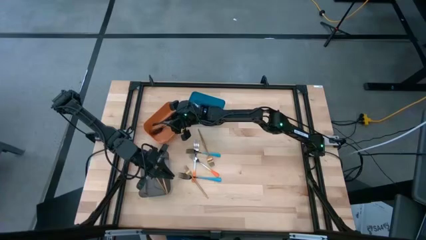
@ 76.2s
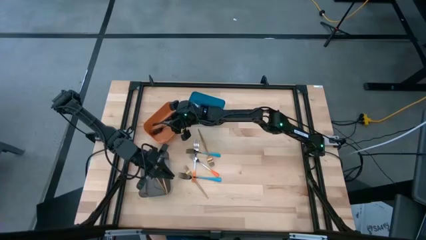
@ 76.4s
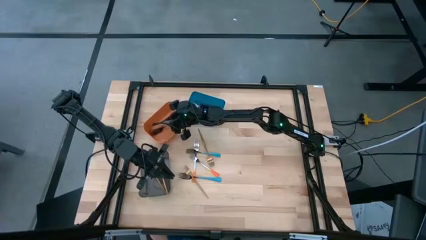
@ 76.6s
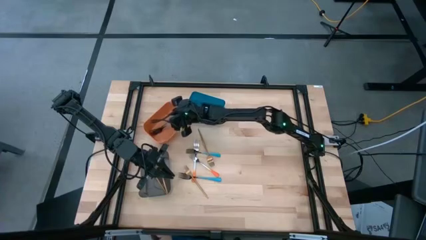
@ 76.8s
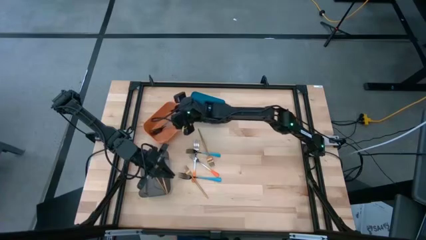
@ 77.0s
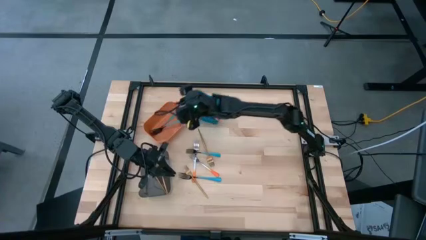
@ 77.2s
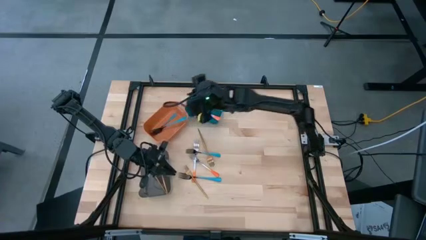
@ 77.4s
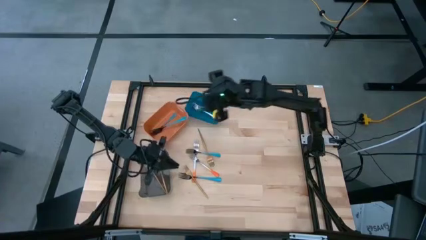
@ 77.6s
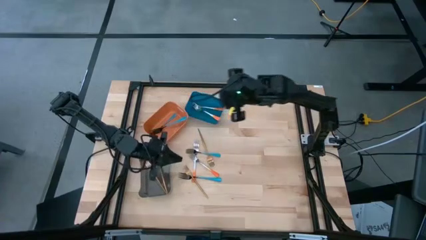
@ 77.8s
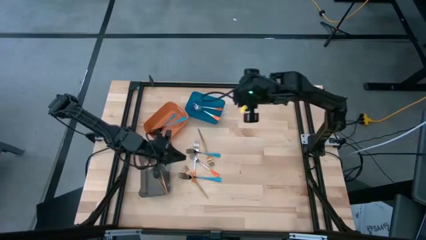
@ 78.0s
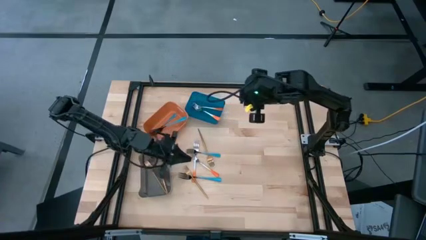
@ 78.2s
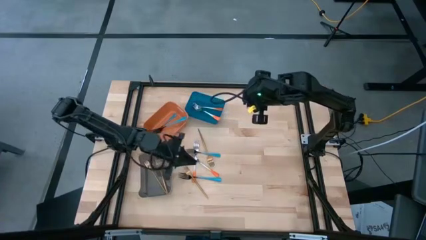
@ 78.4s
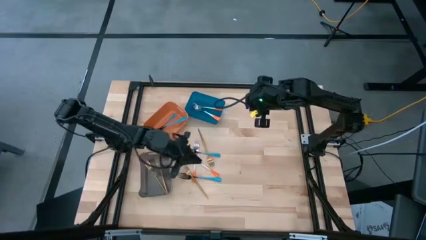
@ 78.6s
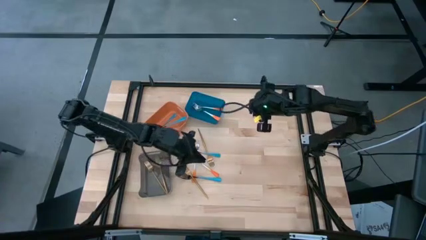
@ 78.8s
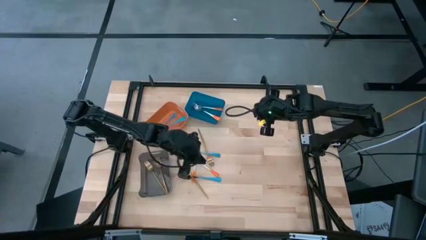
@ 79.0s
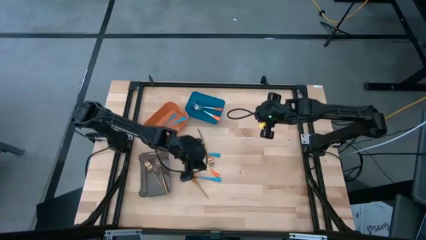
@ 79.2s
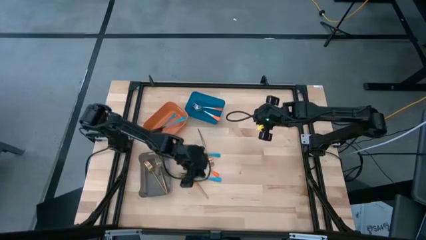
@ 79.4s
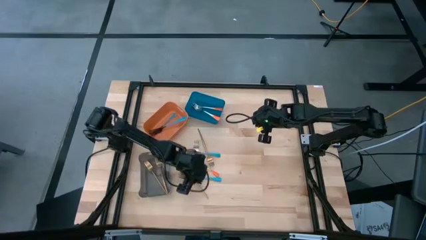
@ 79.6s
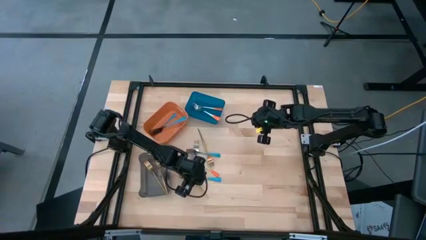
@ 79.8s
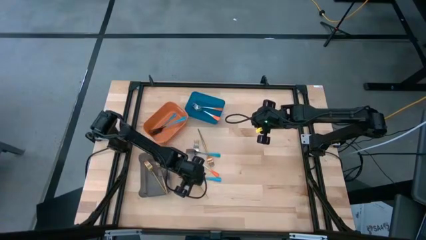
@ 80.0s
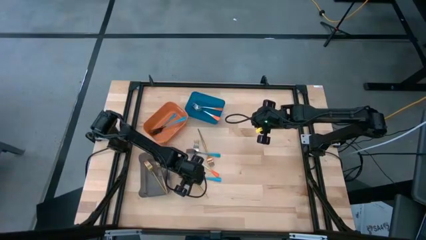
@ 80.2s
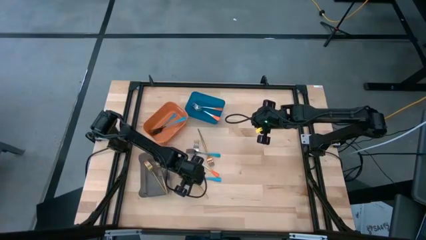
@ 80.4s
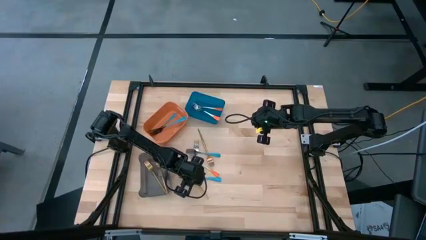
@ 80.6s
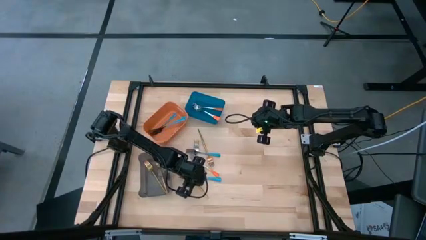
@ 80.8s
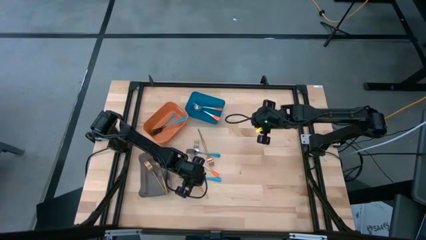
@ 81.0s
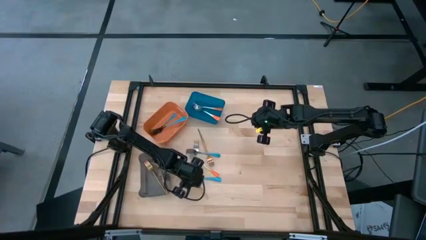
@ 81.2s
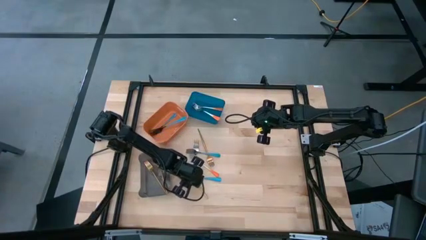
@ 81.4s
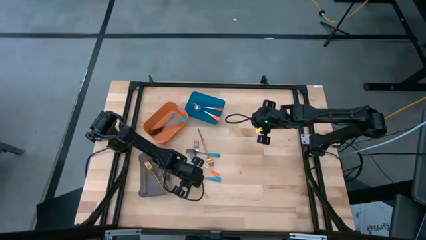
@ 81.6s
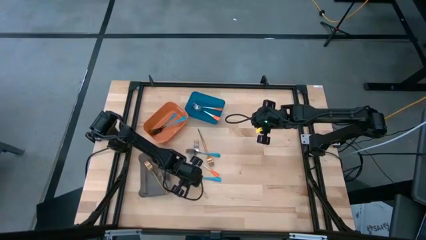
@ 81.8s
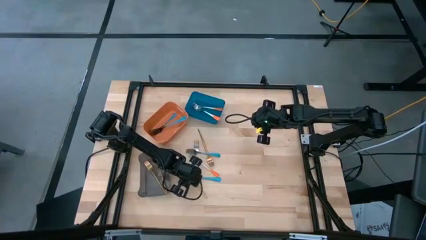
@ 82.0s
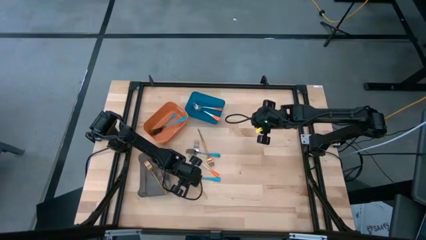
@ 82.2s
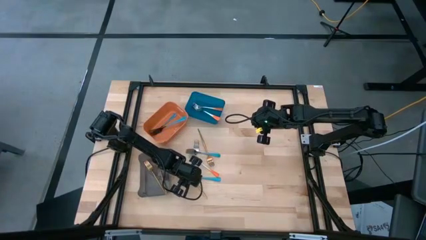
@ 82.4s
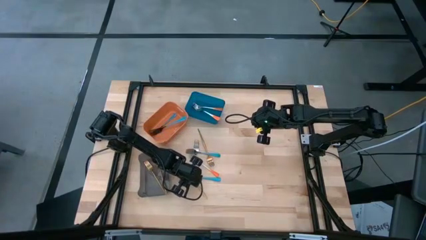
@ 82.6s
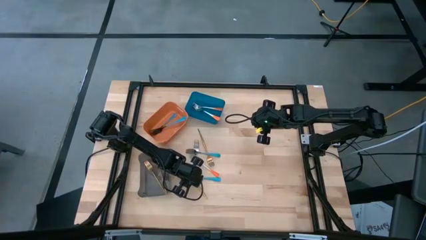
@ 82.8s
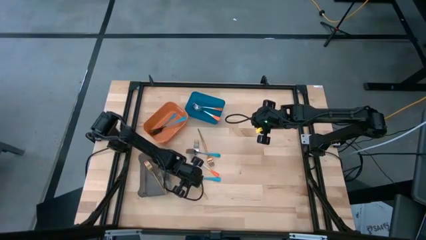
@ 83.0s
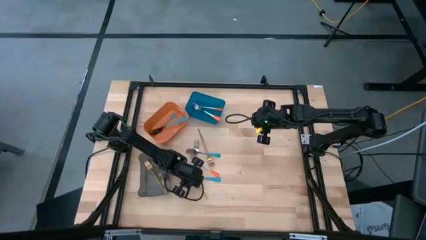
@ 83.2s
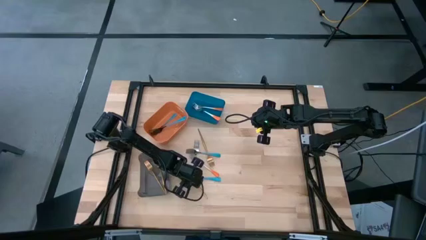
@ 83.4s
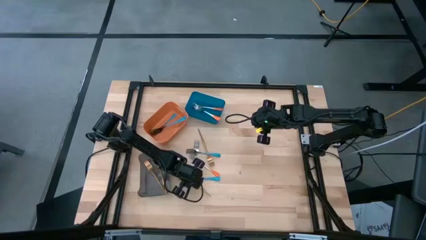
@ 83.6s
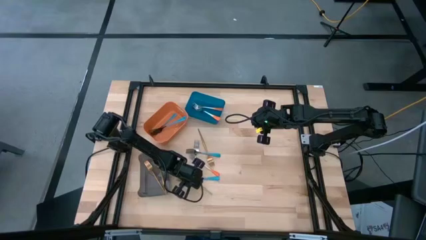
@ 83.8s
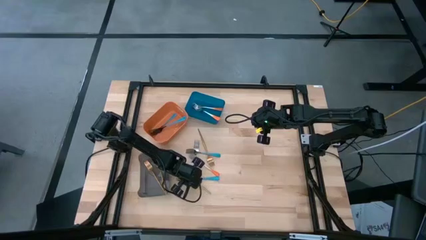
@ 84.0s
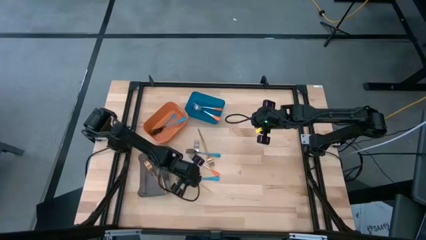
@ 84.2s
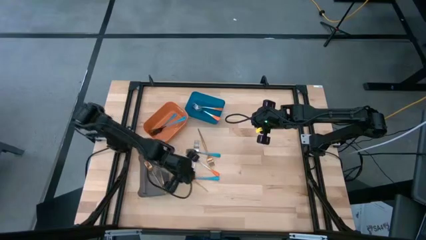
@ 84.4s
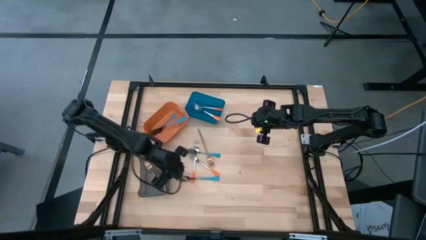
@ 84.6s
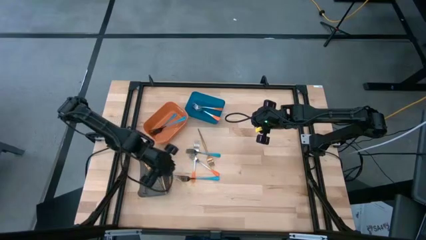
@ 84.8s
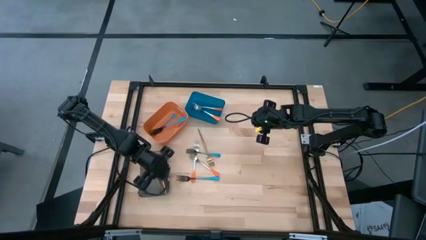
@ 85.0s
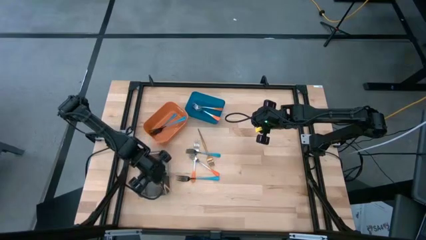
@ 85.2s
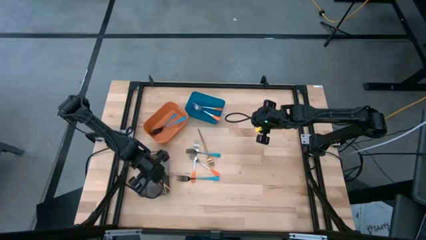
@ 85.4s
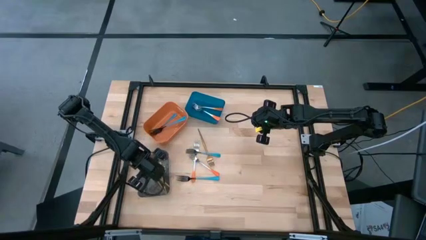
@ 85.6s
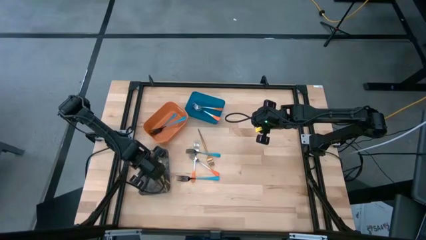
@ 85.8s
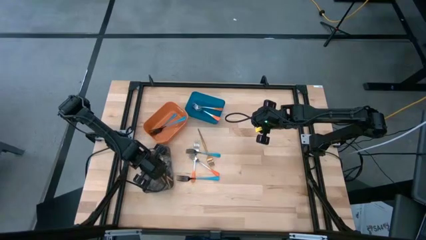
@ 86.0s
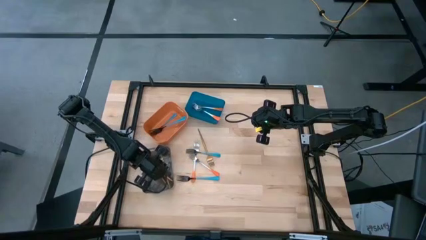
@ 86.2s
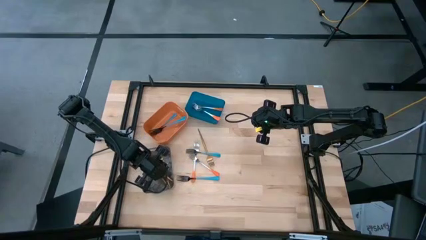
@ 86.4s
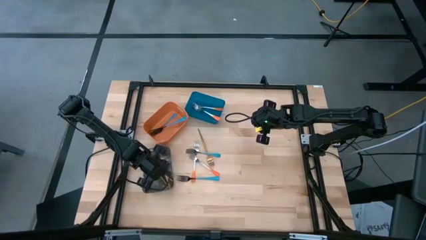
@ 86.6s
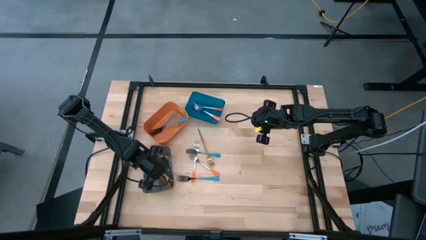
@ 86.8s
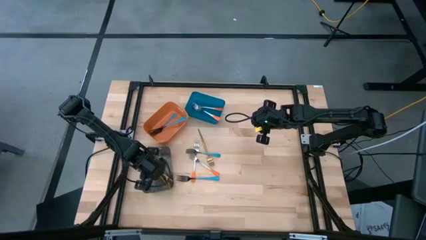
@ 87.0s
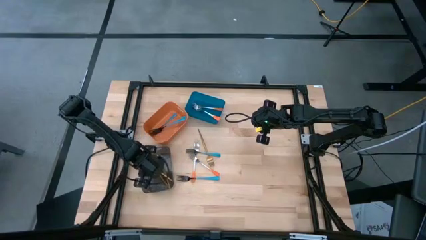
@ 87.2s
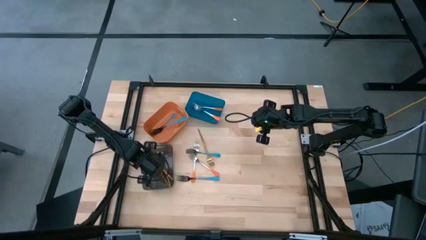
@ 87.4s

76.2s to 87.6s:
Task: Sort silverware by color (type)
Put the gold fork into the black bin
